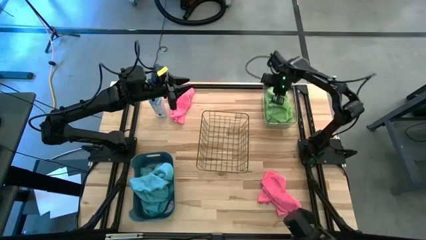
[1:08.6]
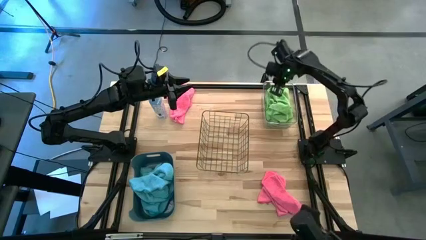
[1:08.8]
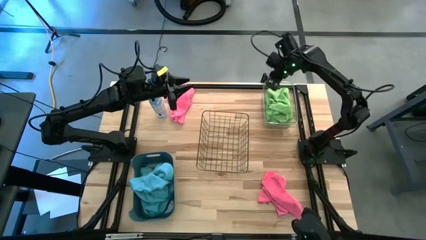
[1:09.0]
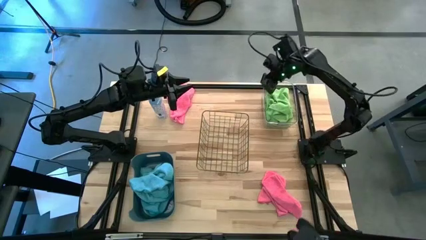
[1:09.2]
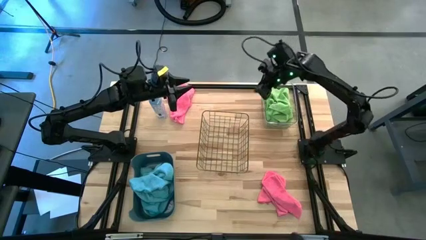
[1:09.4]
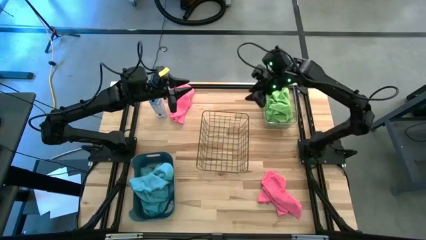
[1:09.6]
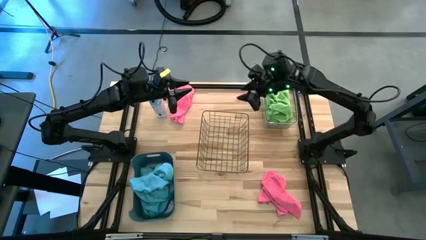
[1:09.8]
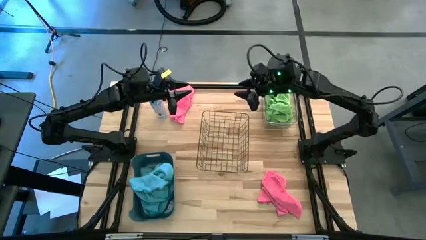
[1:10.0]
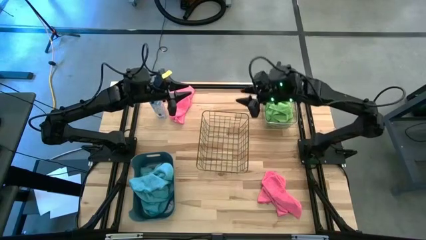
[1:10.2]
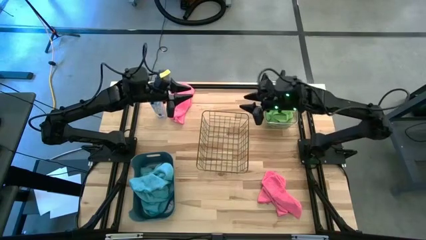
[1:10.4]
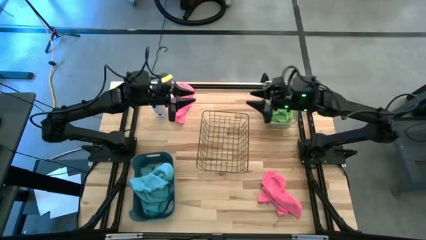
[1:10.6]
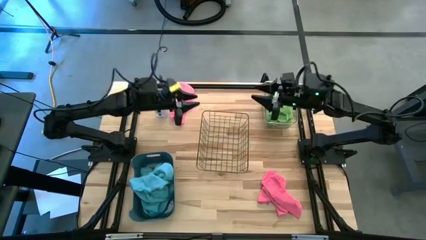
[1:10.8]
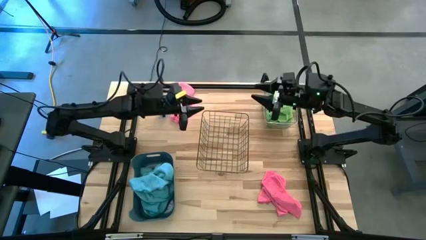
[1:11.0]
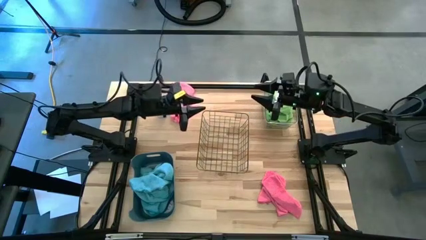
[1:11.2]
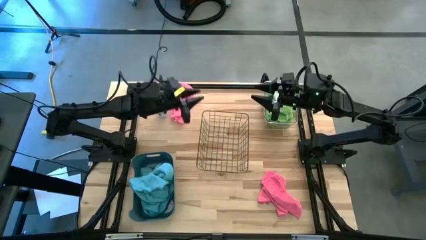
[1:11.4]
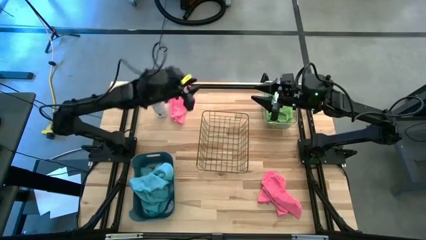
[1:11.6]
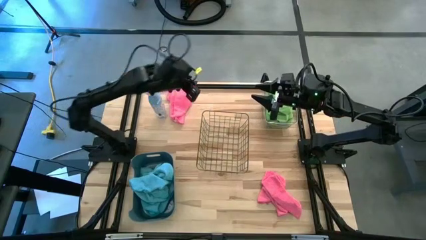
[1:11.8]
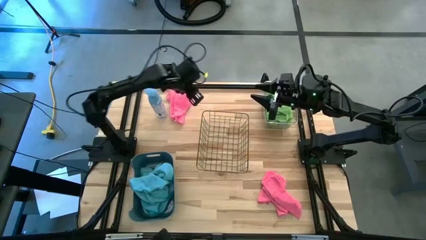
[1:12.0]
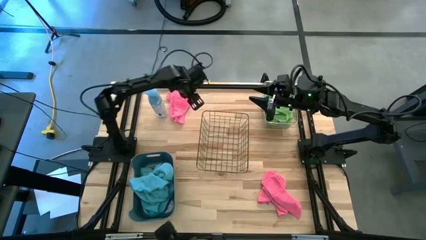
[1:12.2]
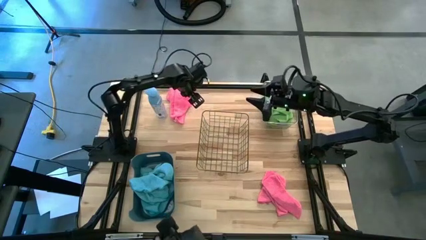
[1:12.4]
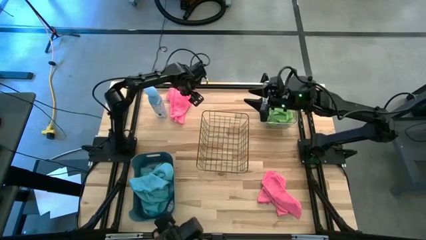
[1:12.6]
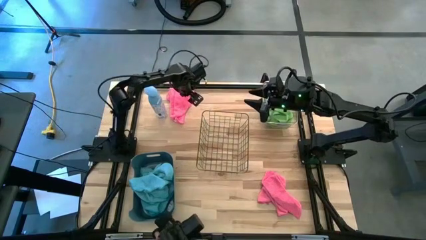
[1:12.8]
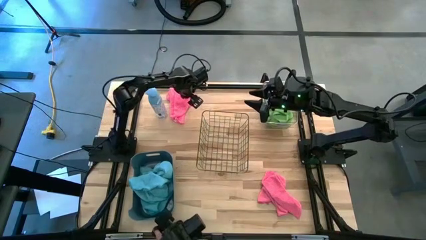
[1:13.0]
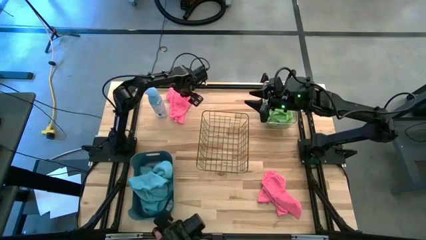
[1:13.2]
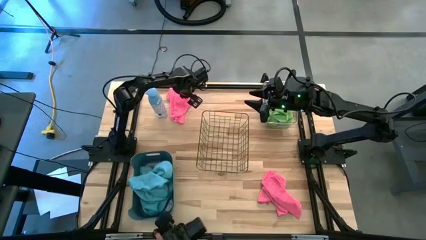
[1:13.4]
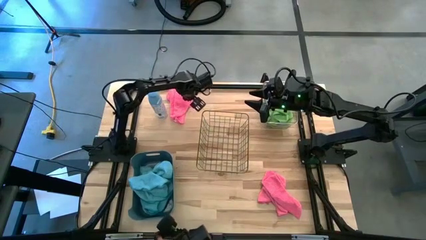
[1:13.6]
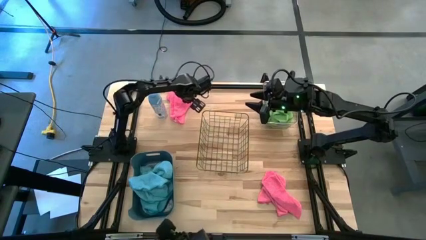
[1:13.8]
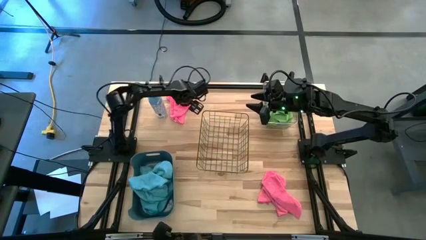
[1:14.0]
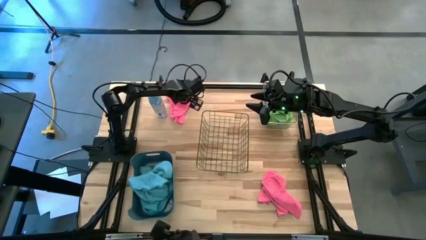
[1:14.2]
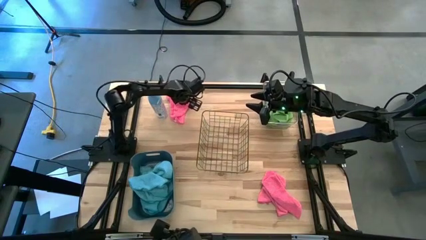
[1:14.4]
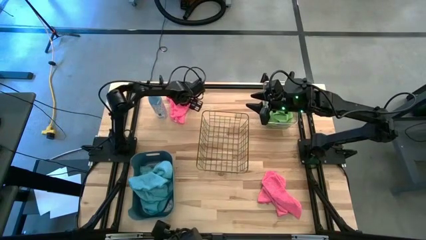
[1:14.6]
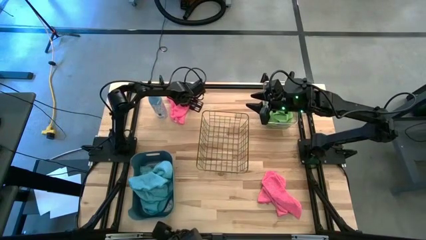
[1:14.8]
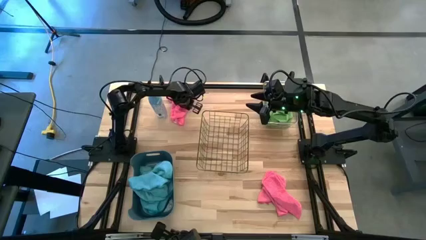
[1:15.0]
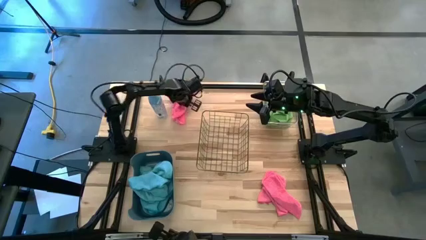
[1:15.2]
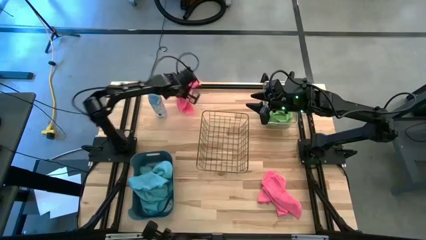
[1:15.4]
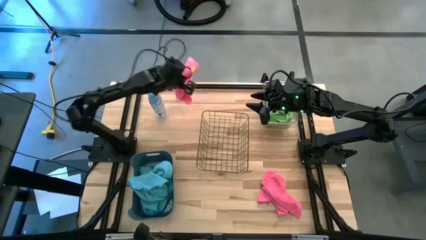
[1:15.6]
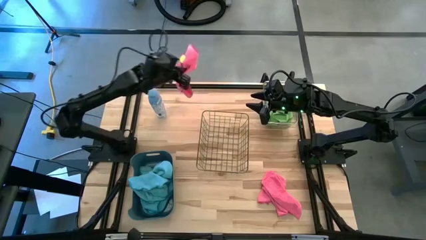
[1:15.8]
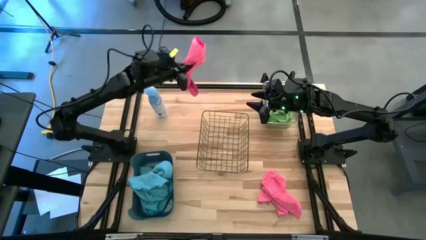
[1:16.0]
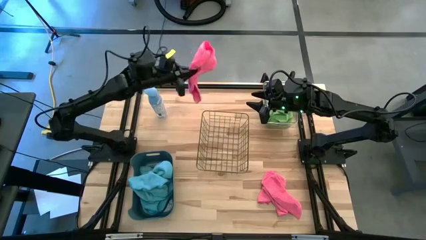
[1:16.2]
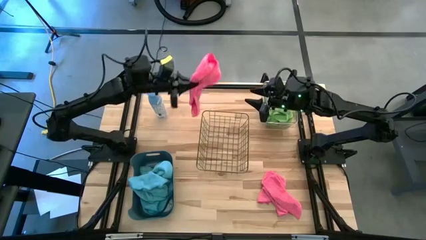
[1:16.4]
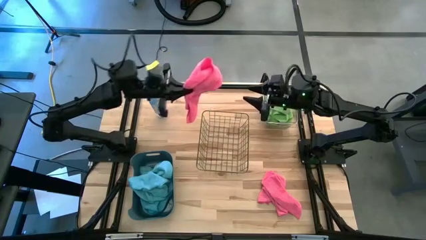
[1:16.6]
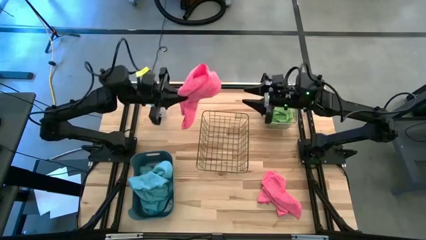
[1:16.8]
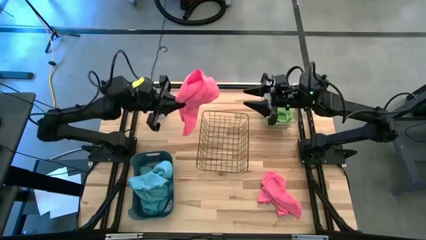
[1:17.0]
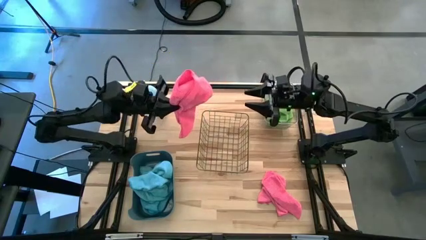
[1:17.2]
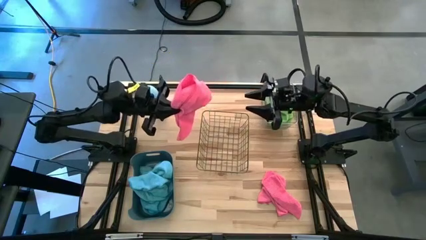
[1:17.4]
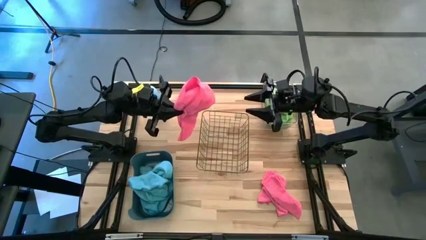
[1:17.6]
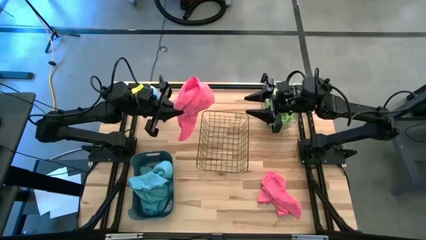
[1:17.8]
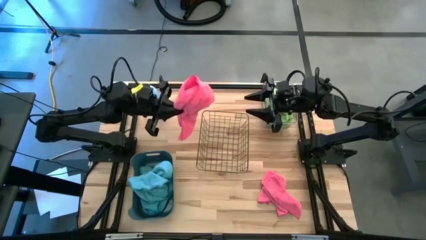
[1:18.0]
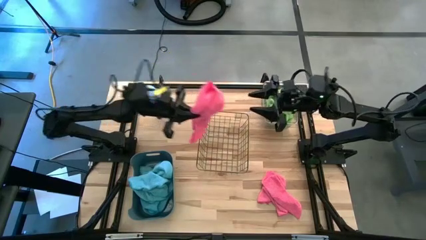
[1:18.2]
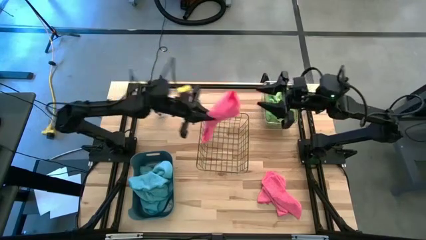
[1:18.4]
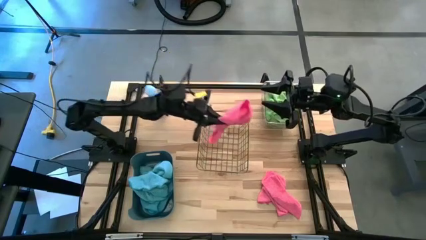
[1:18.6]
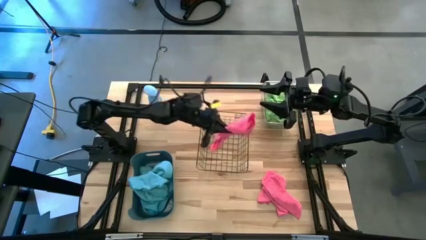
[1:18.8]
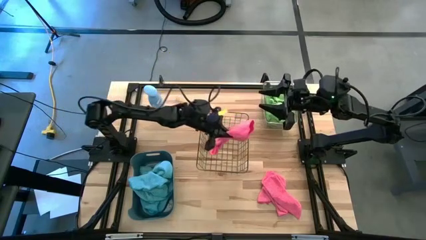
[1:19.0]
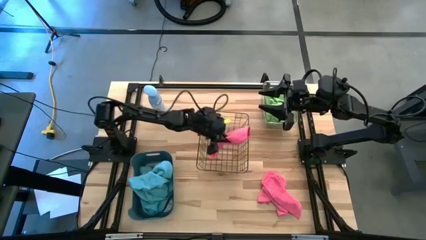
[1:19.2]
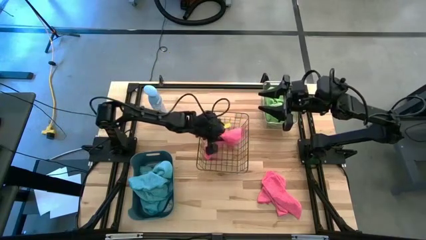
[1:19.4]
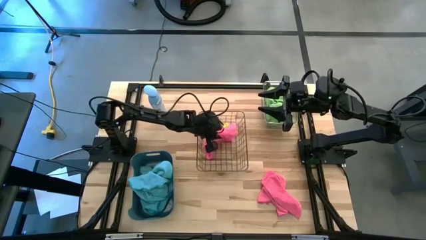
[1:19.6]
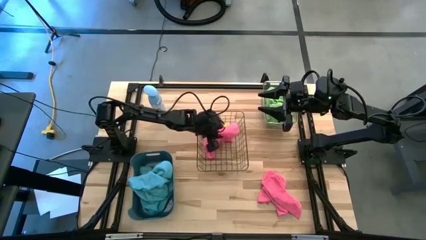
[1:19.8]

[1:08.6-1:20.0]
Task: Sort microfiber towel by color & place in baskets
Put the top pink microfiber cloth into the gold wire basket

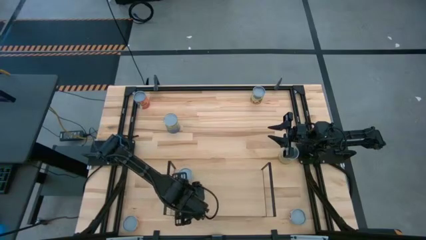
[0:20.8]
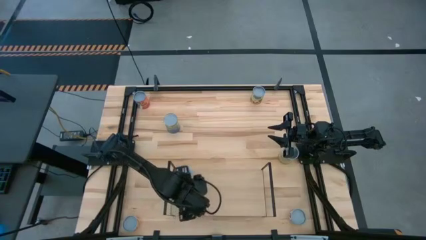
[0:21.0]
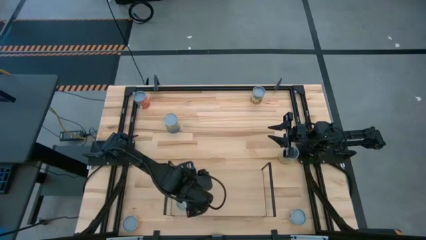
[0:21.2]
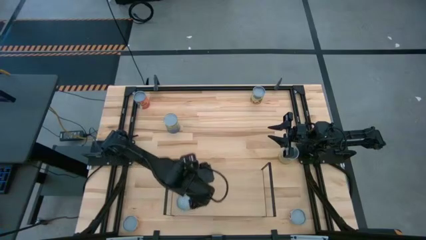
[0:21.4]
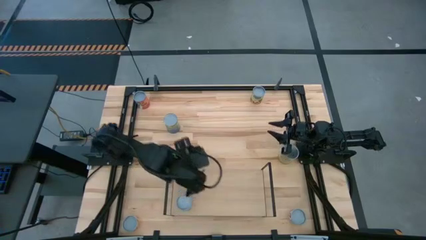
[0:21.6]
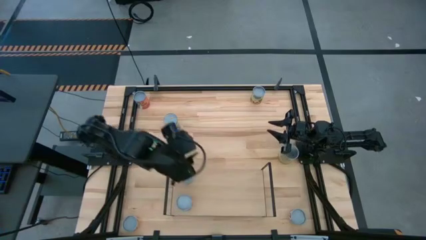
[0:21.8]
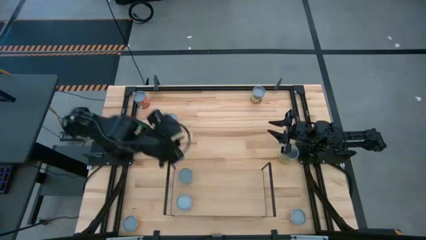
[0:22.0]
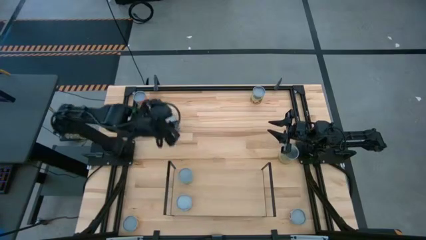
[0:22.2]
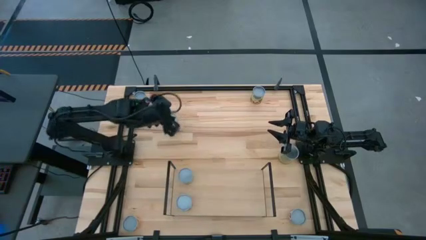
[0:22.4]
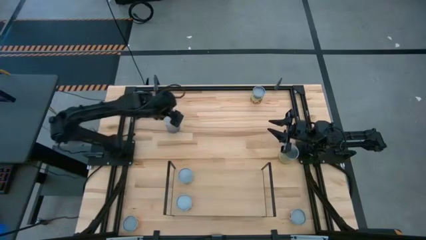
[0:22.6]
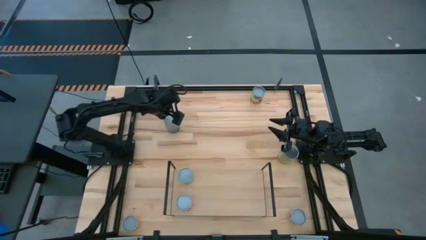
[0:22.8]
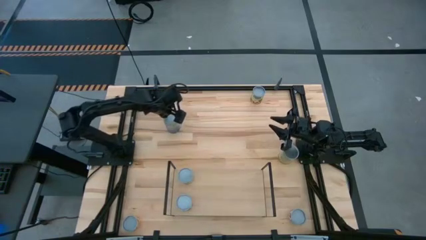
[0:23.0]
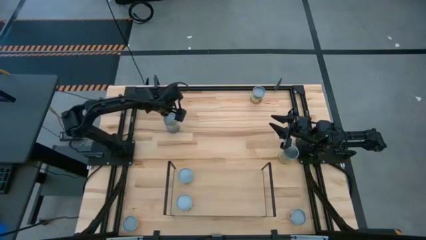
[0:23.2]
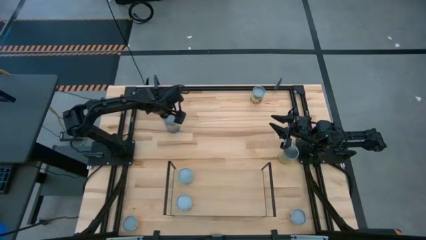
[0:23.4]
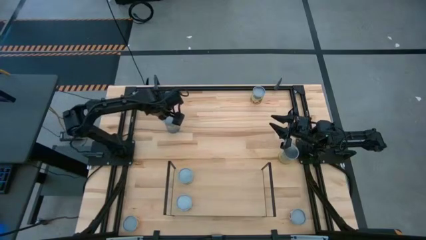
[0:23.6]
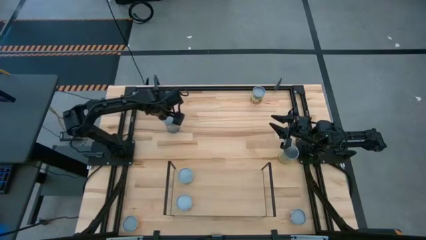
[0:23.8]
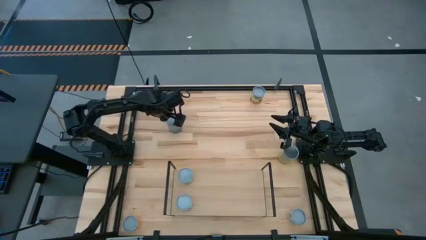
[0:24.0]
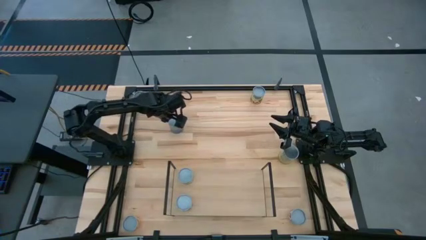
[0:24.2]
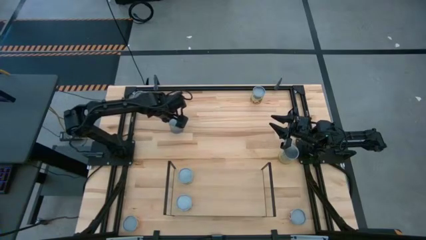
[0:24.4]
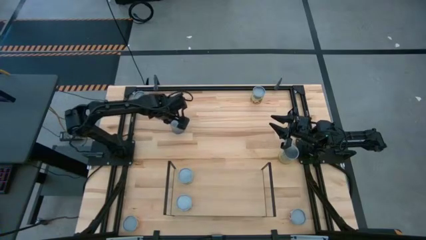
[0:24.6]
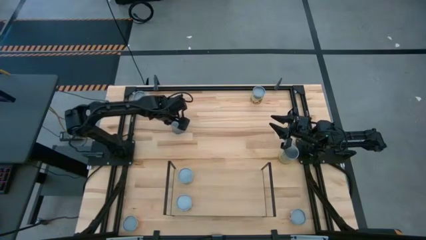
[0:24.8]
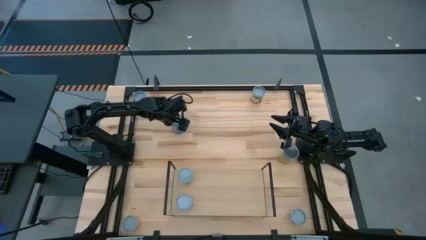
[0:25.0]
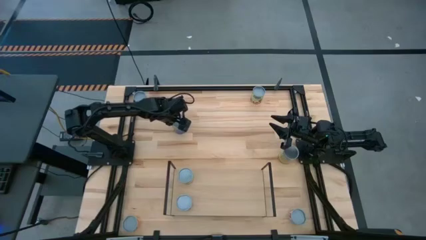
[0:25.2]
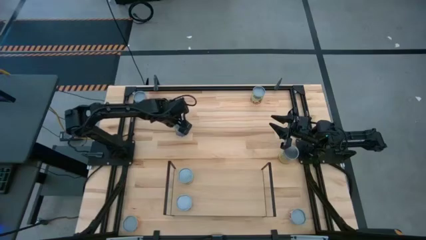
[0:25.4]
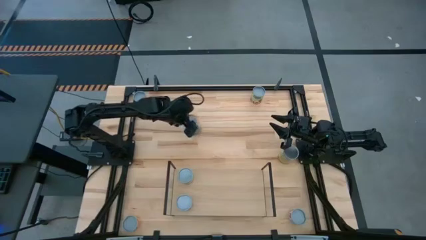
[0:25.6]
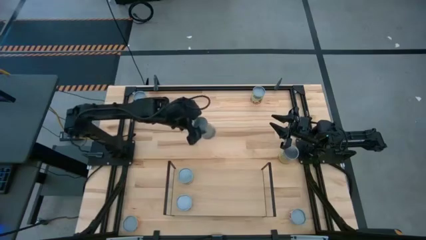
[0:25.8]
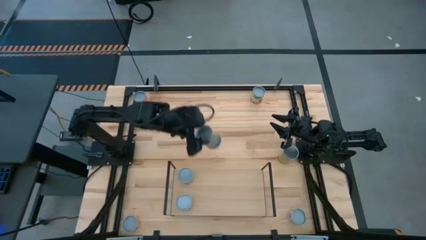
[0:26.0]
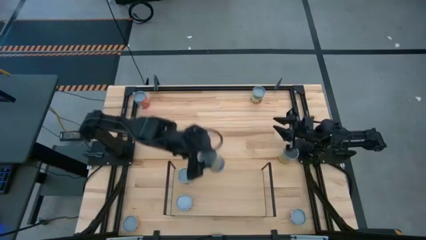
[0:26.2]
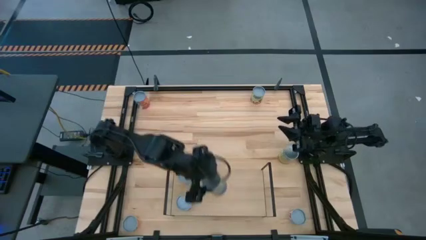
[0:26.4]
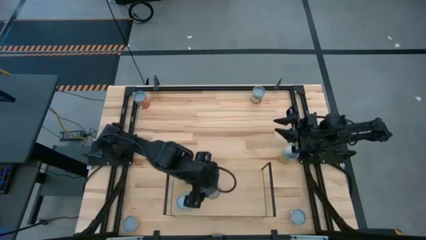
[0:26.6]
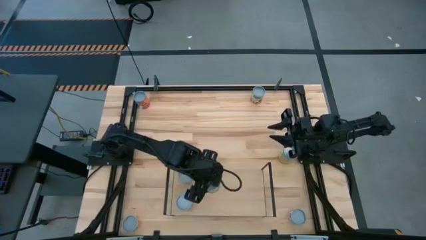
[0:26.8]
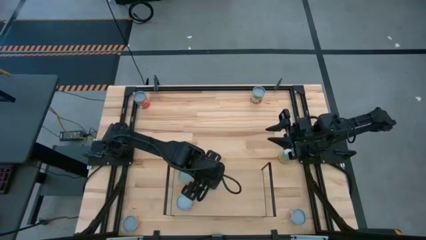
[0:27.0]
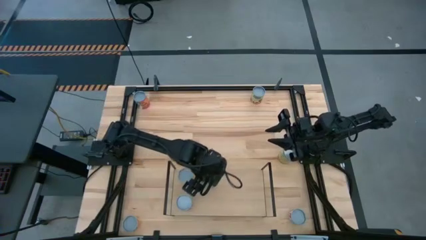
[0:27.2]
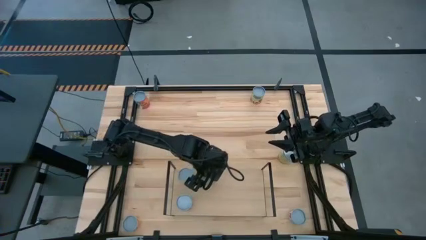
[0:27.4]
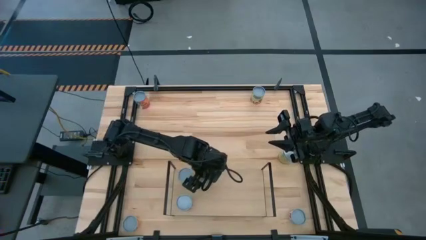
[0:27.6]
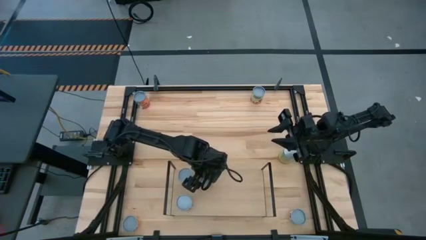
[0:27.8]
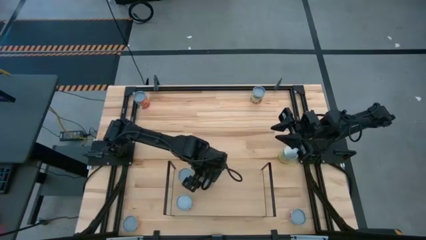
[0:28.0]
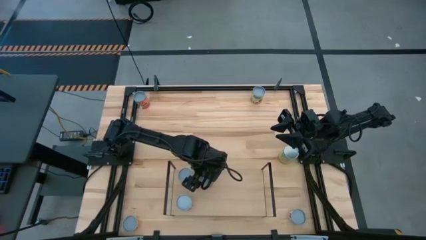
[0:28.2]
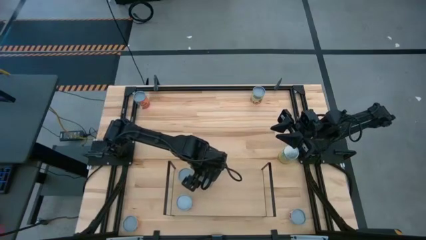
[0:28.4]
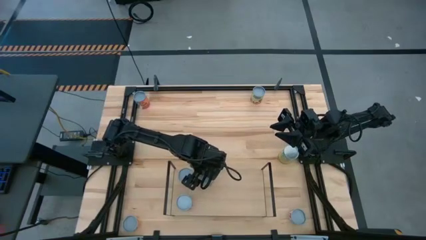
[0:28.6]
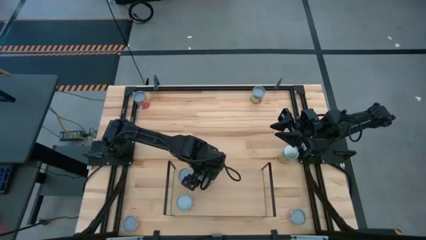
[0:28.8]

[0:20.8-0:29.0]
Task: Pick and place cans onto a shelf
Put the canned peas on the shelf
